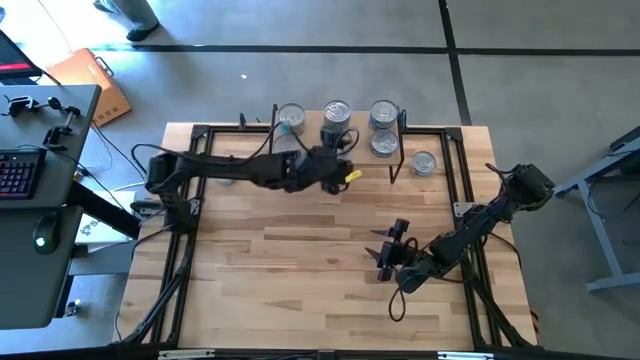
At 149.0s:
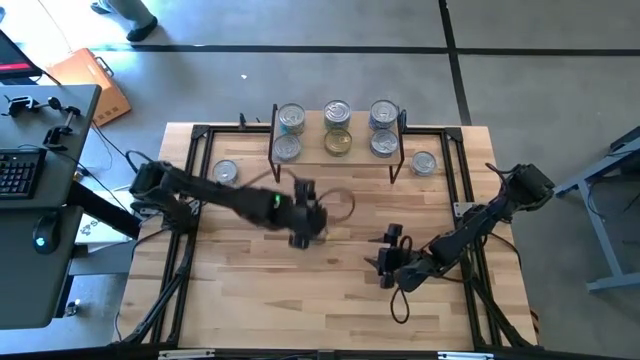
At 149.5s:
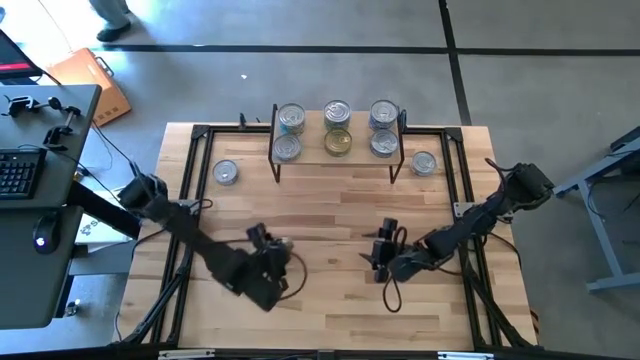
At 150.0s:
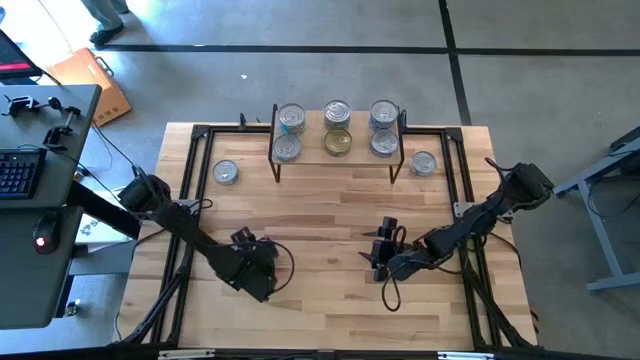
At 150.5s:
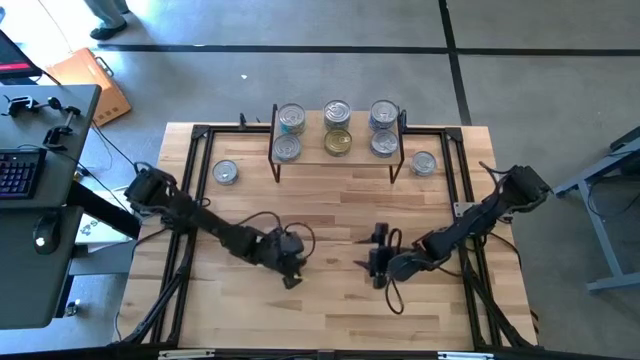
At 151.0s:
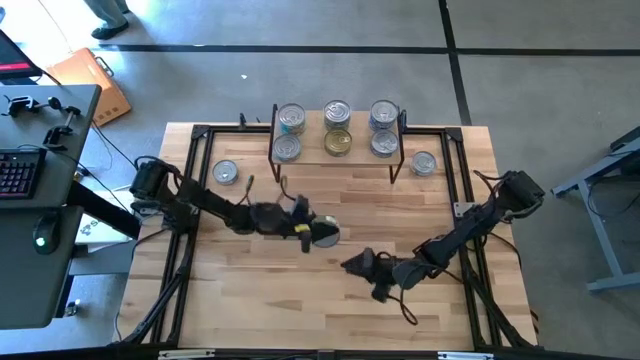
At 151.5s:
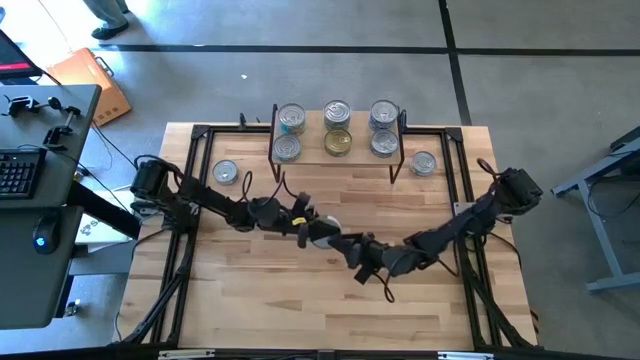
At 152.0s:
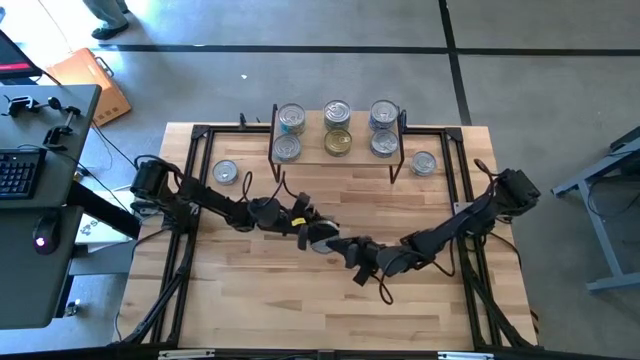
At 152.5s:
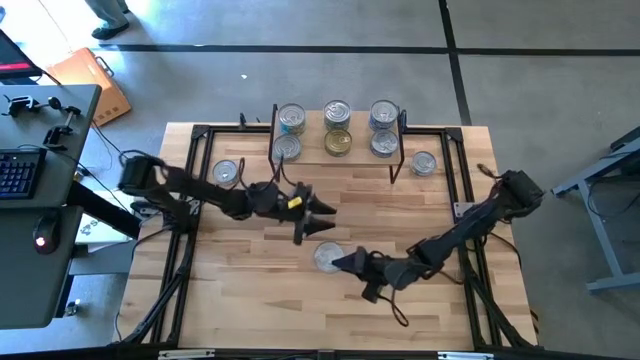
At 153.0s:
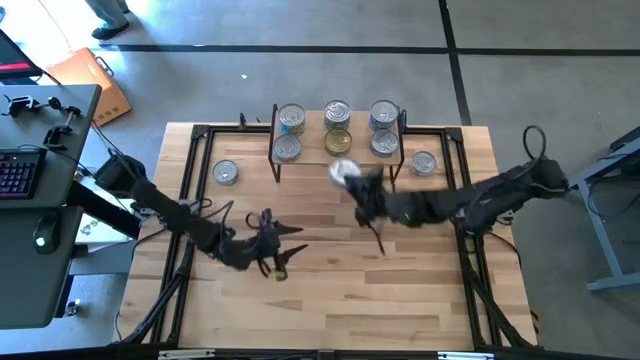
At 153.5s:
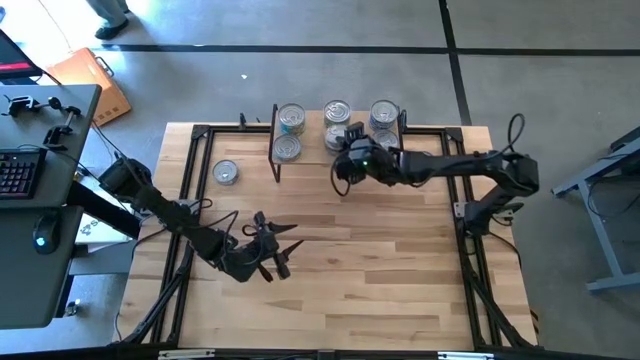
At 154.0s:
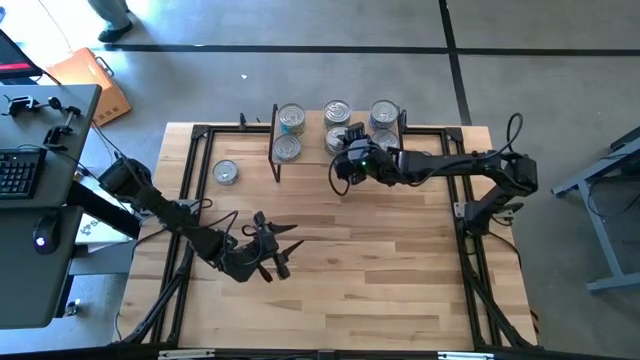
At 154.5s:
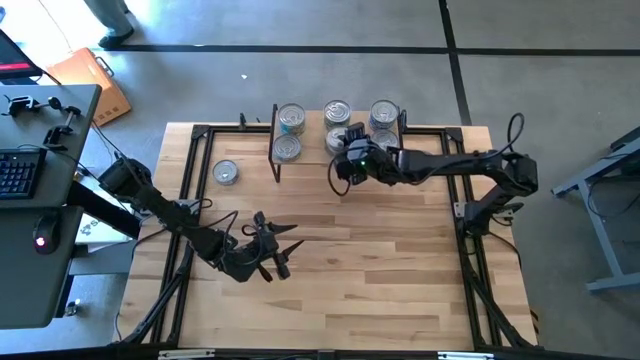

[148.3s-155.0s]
Task: Stack canned seafood by type on shelf
Stack the green tuna can on top of the other green tuna can on the shelf

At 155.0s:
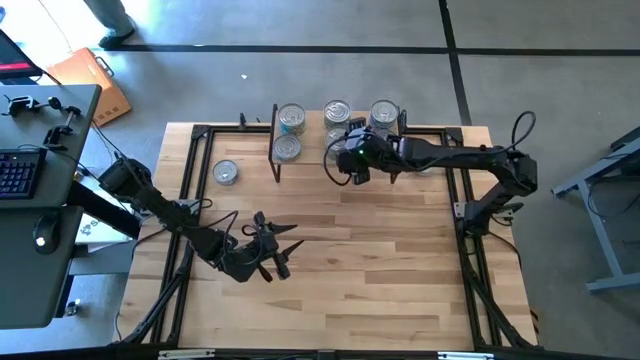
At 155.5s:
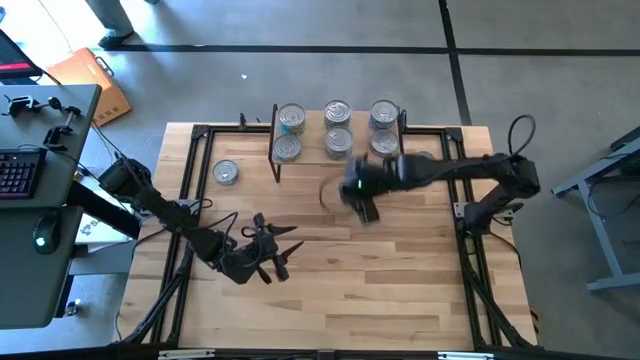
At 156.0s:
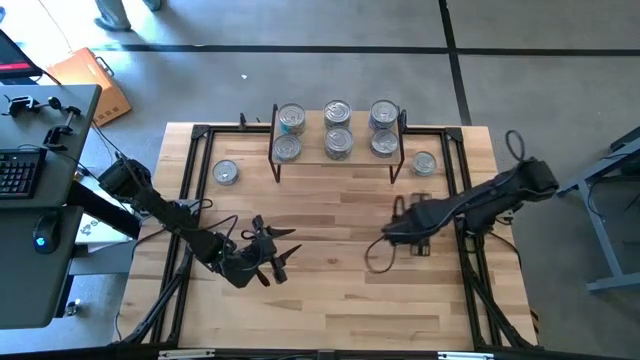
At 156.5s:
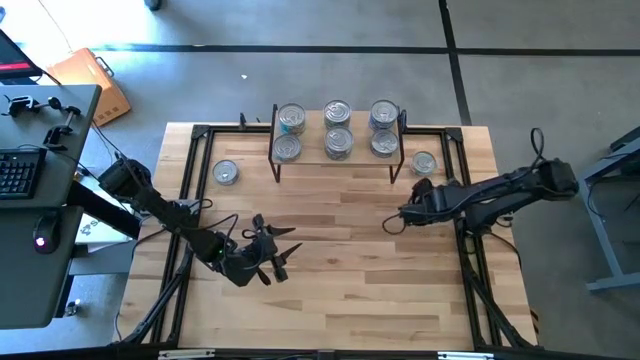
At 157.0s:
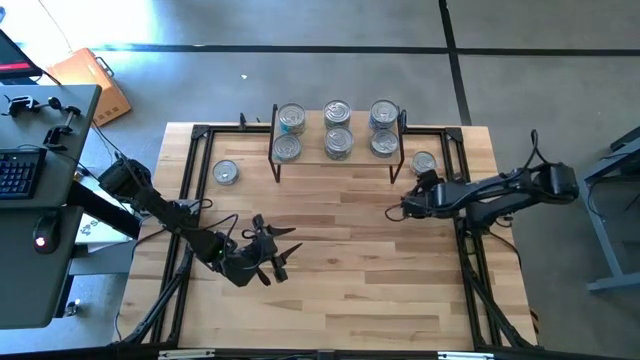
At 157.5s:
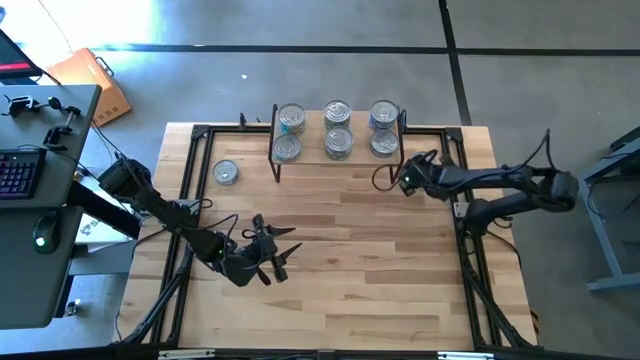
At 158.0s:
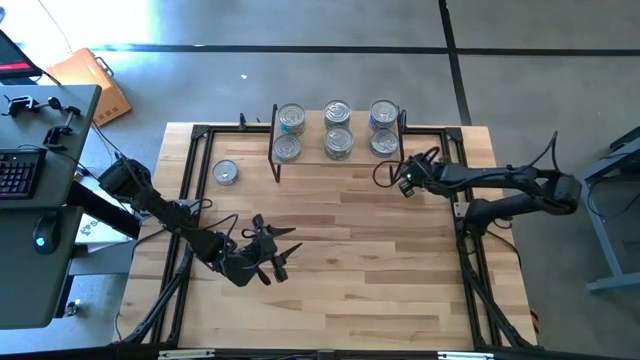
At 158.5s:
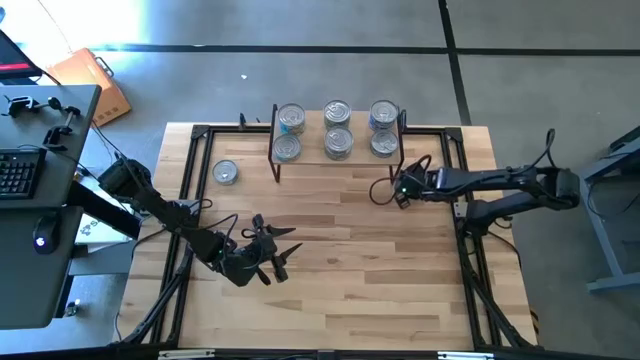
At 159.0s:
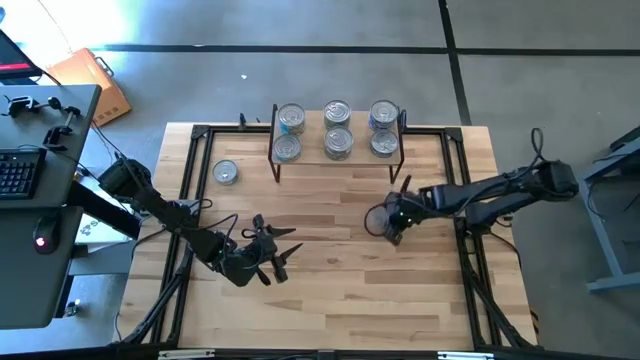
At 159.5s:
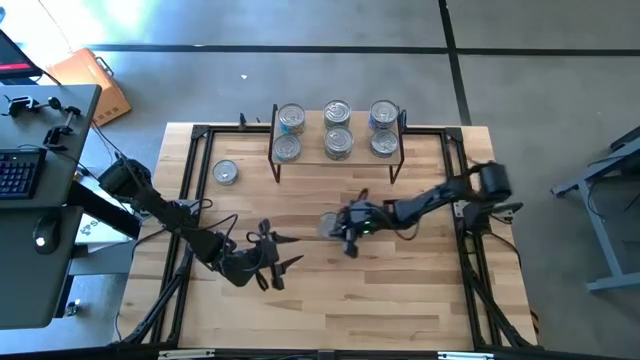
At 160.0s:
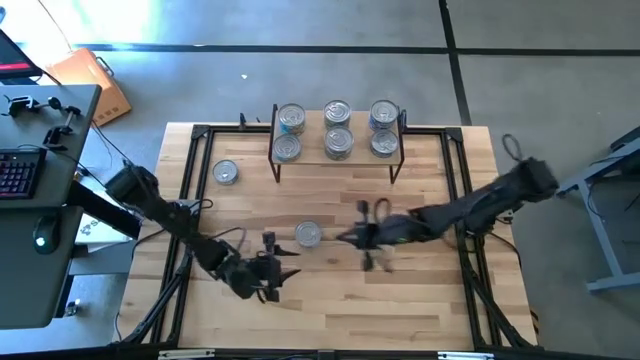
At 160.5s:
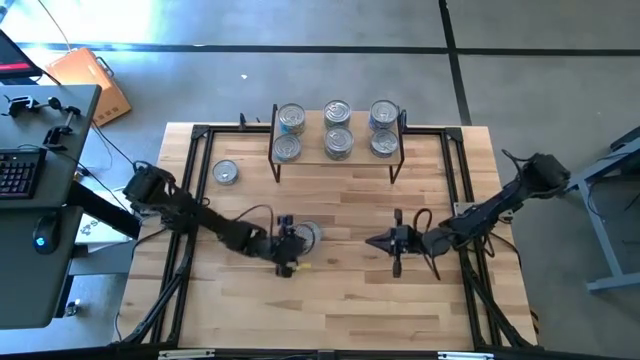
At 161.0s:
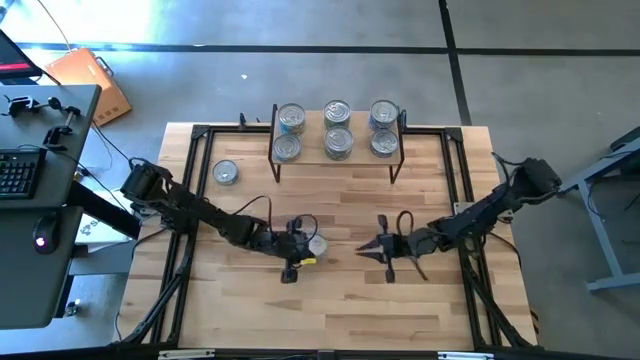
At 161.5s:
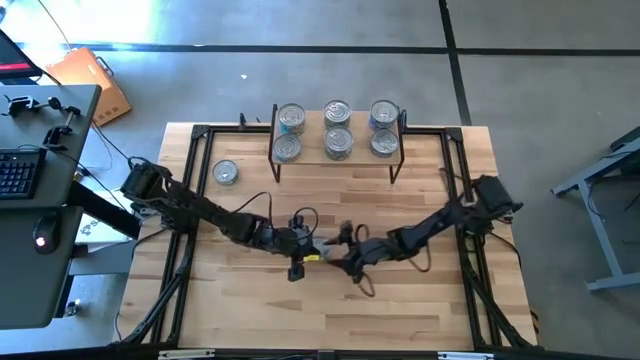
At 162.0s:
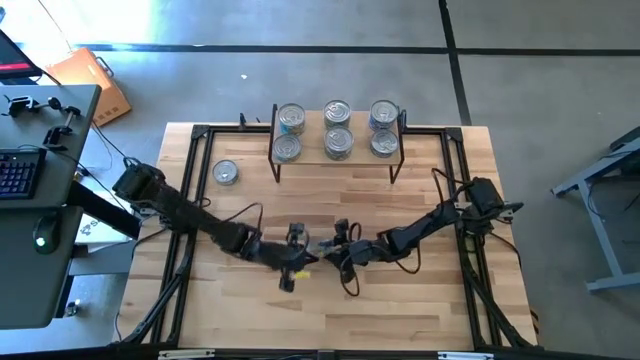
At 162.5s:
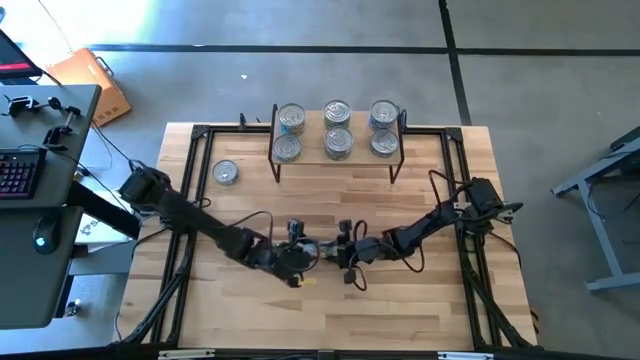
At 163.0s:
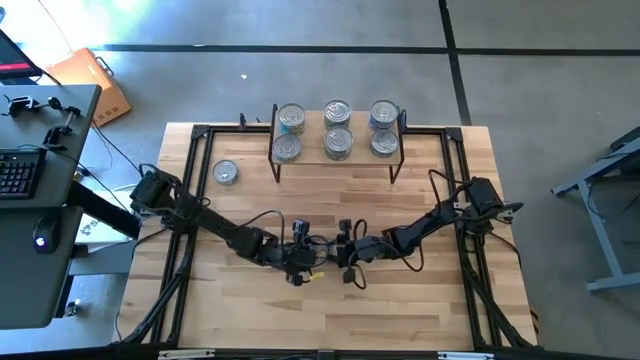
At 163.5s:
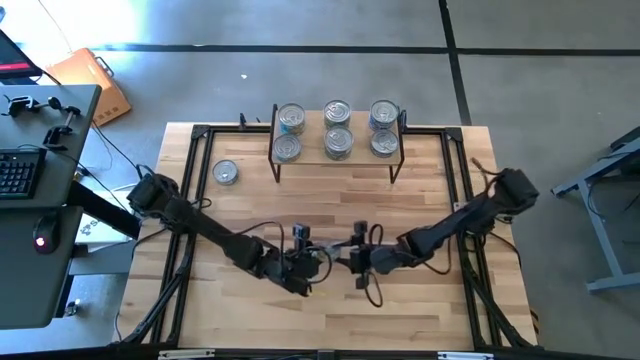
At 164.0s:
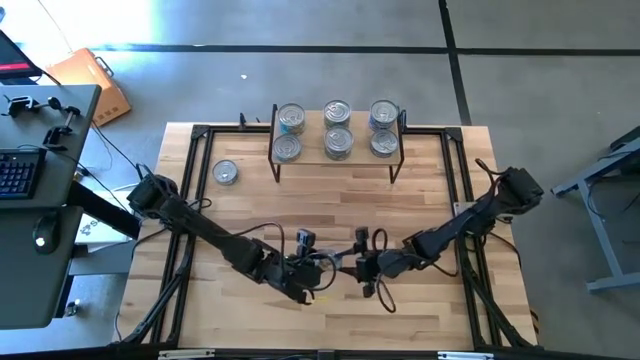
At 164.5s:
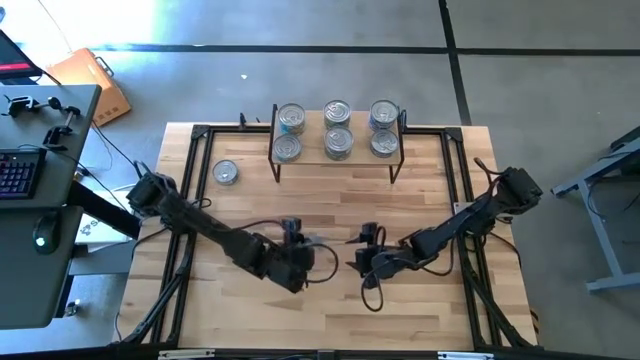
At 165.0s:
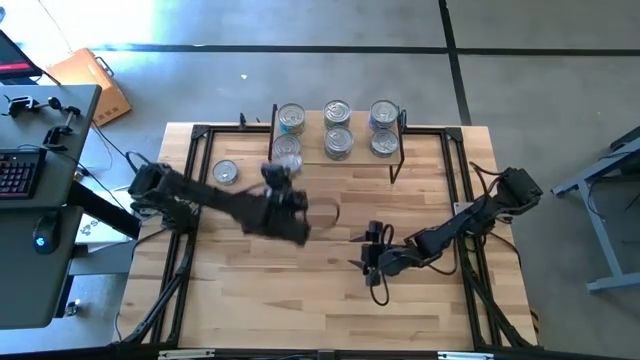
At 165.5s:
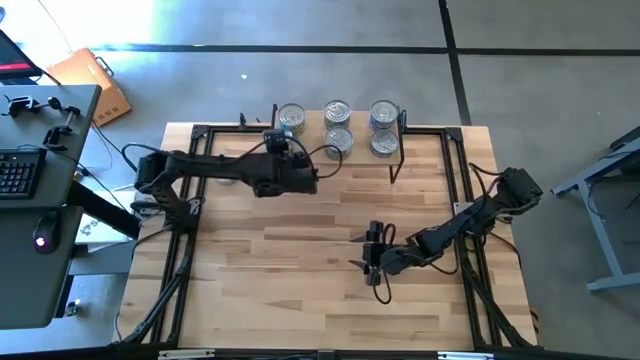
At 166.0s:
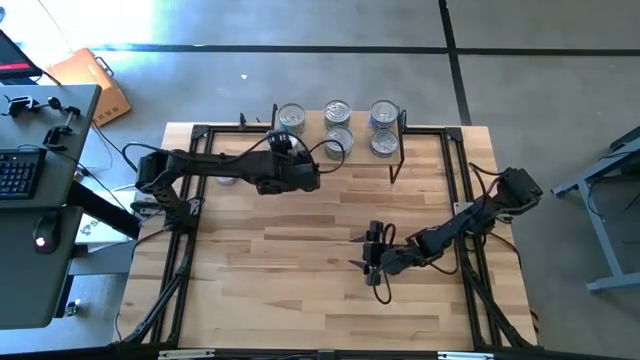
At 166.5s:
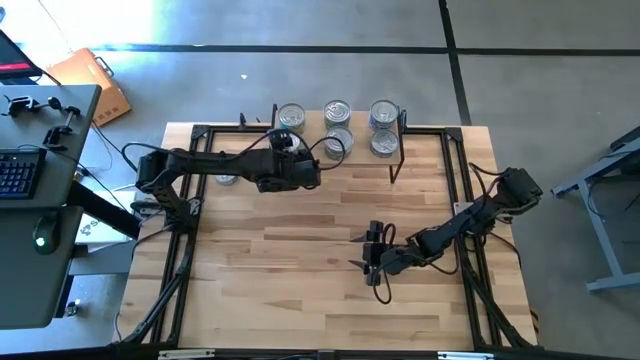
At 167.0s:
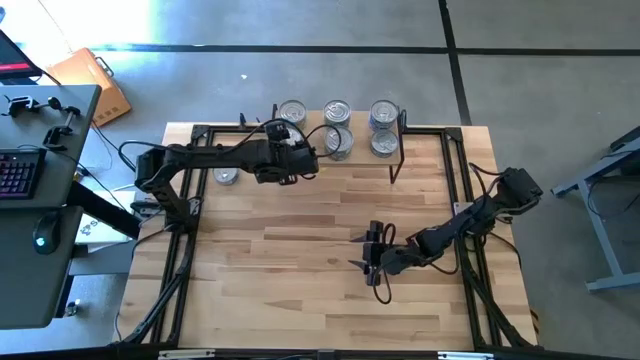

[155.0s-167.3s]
Stack the yellow tuna can on top of the other yellow tuna can on the shelf

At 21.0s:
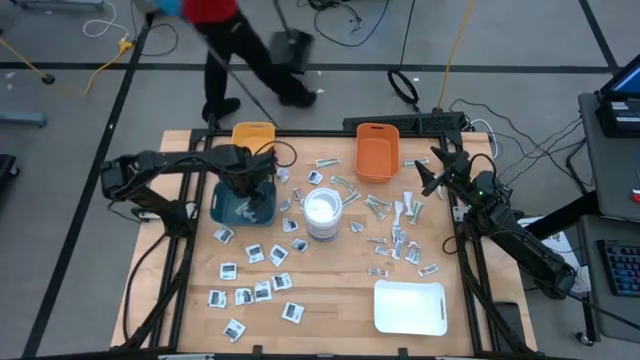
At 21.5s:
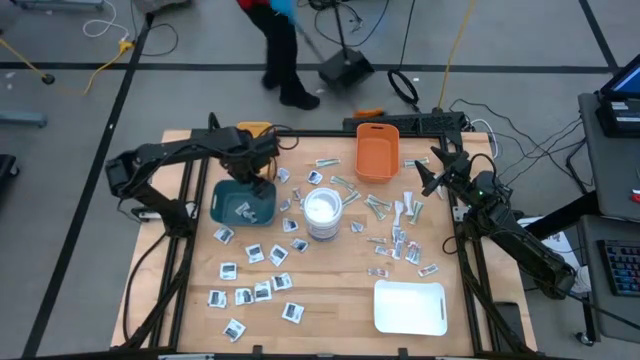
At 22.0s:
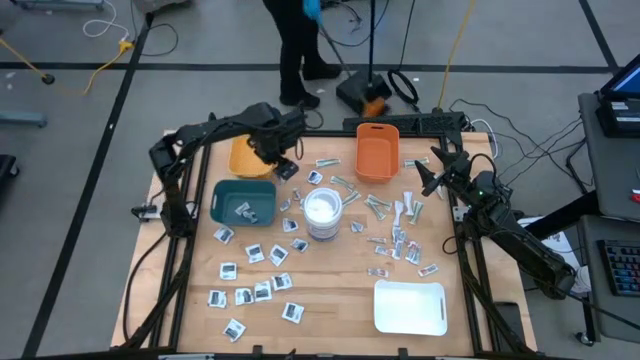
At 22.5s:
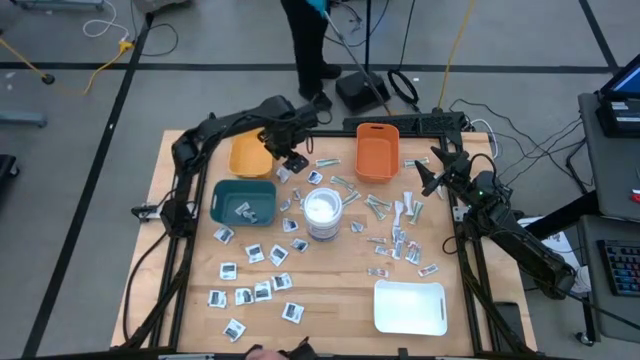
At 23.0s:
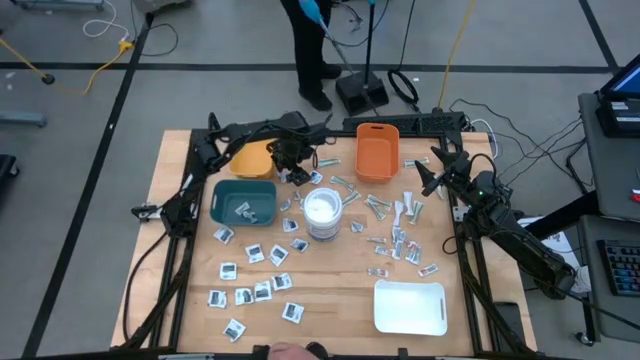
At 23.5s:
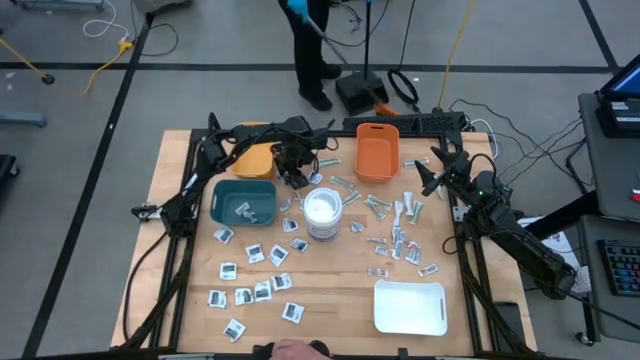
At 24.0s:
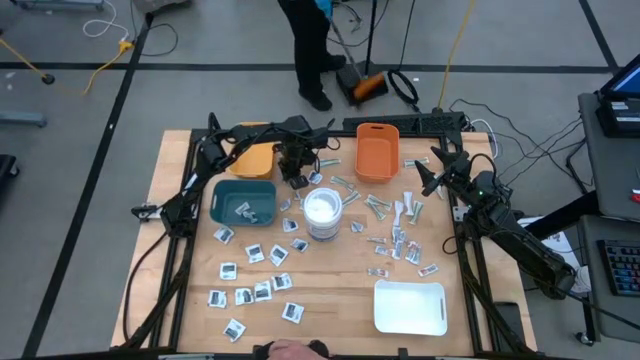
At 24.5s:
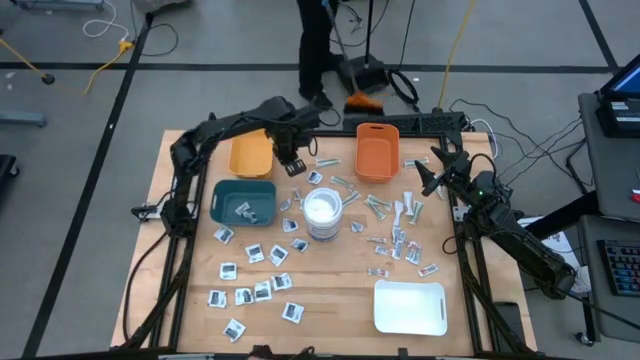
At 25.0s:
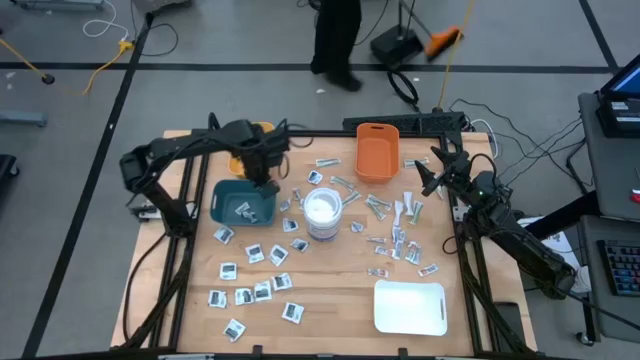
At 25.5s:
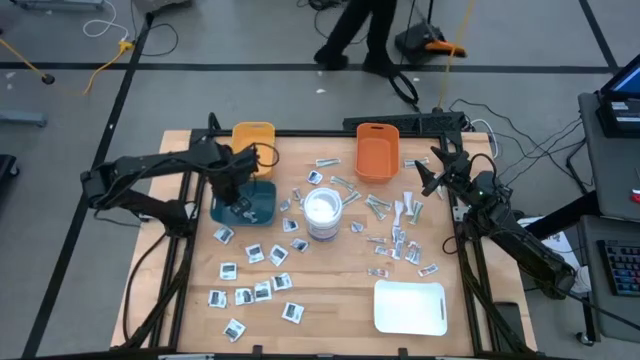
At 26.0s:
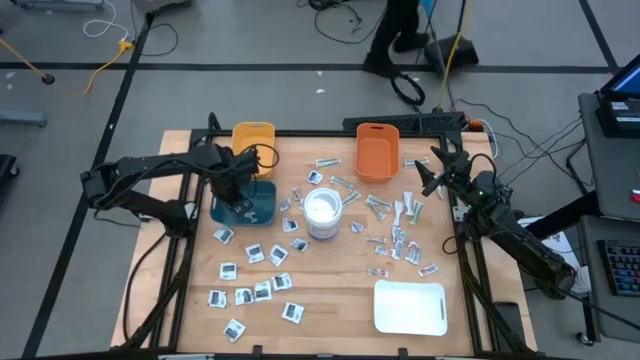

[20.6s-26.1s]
Task: Pick & Place First Aid Supplies
Put the blue pad into the blue bin
